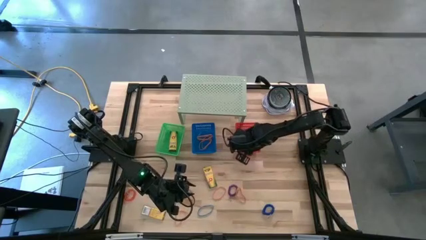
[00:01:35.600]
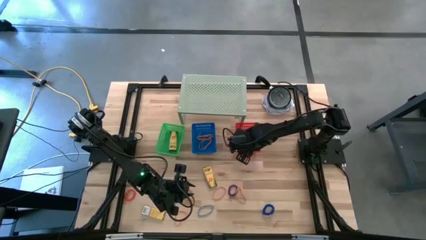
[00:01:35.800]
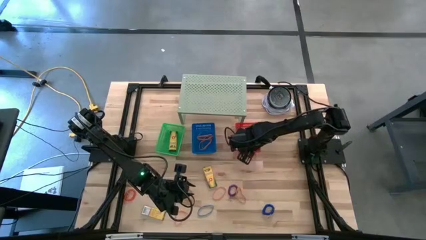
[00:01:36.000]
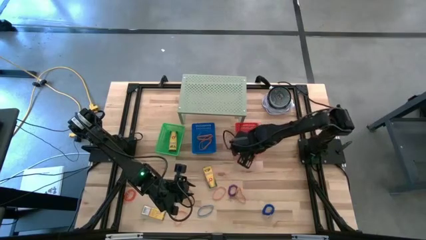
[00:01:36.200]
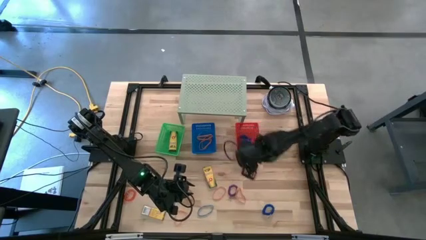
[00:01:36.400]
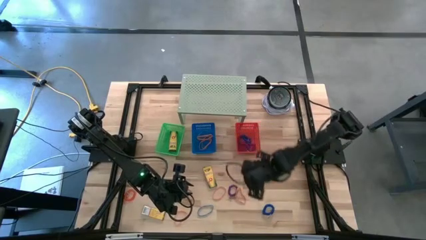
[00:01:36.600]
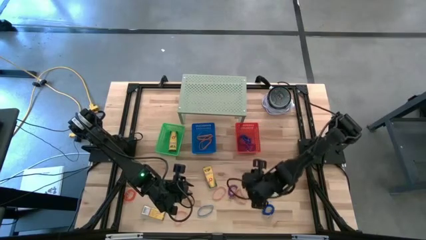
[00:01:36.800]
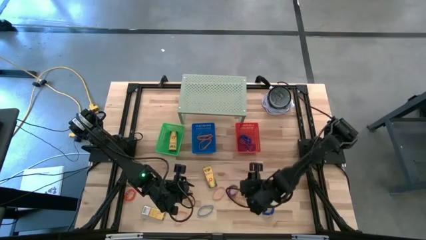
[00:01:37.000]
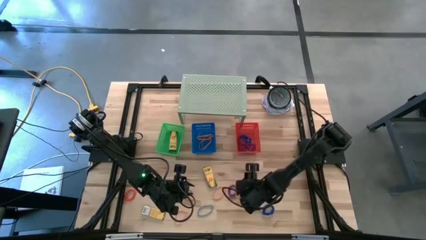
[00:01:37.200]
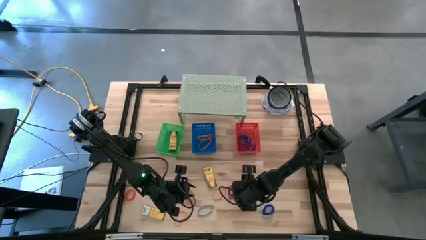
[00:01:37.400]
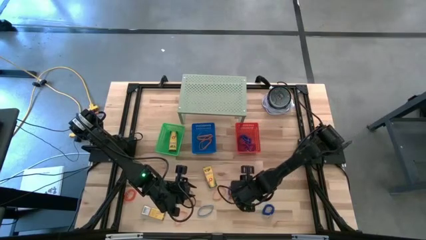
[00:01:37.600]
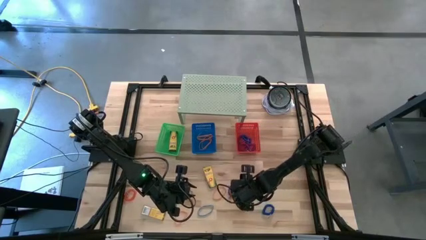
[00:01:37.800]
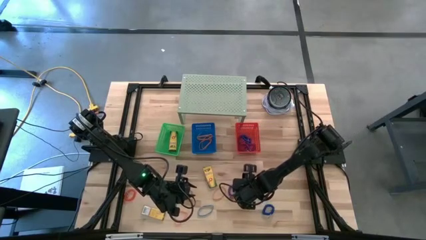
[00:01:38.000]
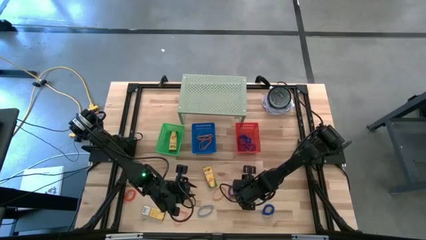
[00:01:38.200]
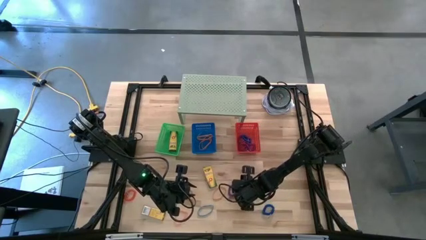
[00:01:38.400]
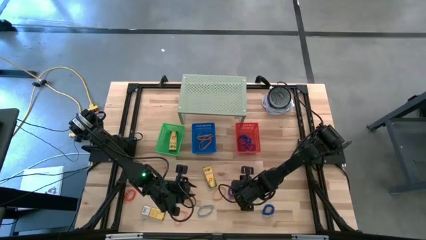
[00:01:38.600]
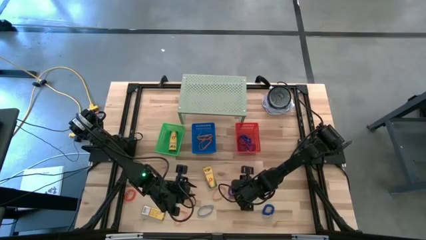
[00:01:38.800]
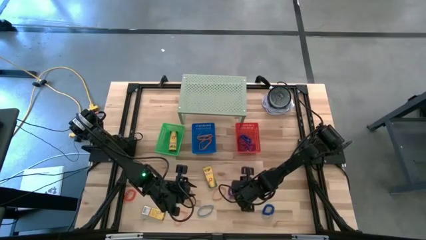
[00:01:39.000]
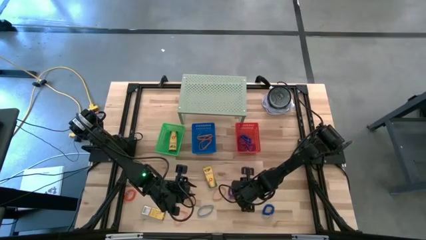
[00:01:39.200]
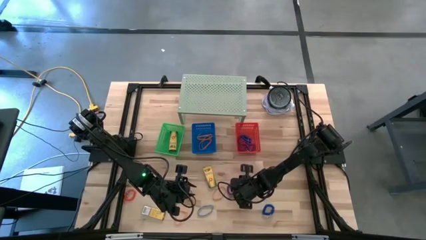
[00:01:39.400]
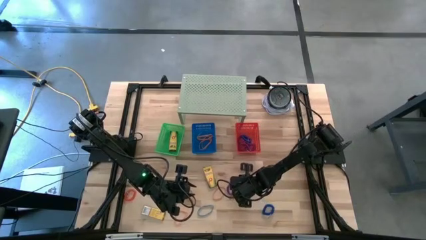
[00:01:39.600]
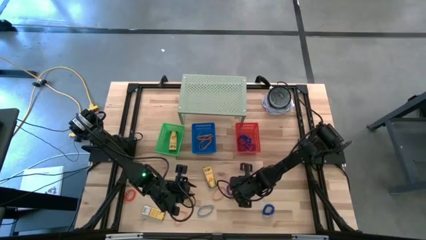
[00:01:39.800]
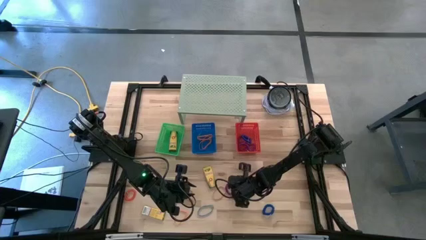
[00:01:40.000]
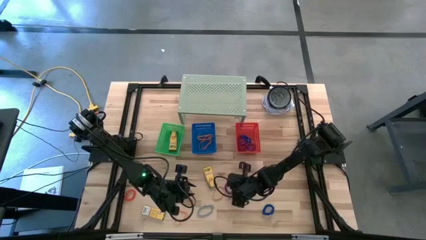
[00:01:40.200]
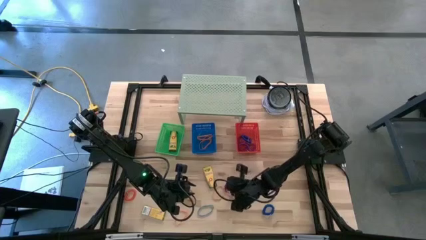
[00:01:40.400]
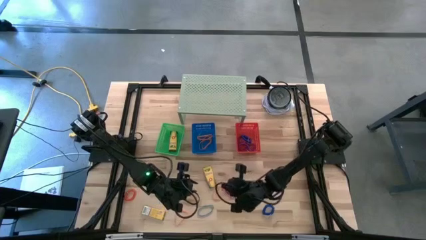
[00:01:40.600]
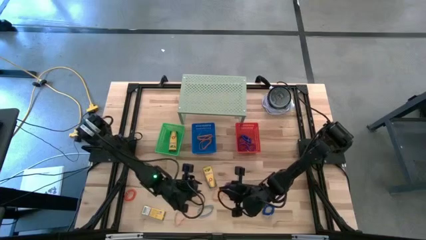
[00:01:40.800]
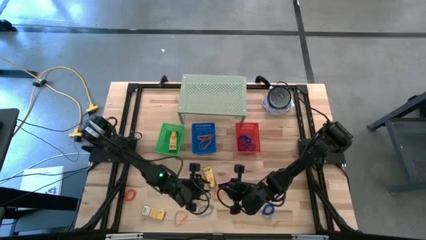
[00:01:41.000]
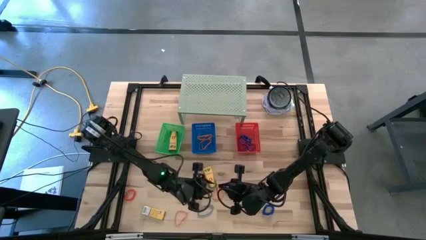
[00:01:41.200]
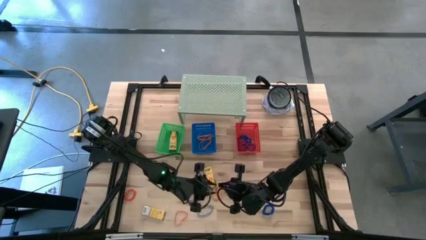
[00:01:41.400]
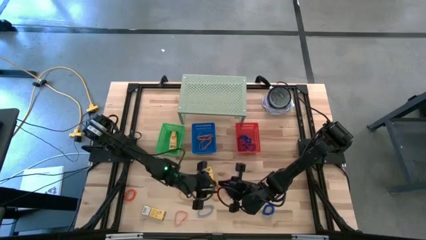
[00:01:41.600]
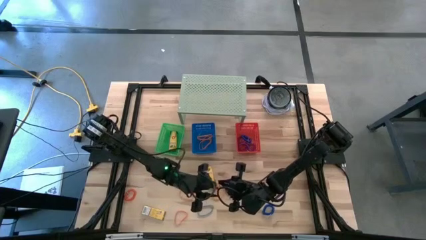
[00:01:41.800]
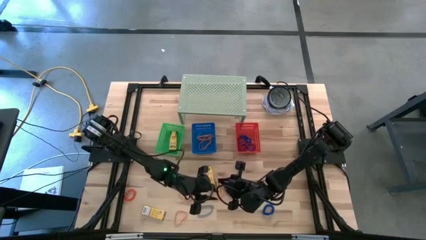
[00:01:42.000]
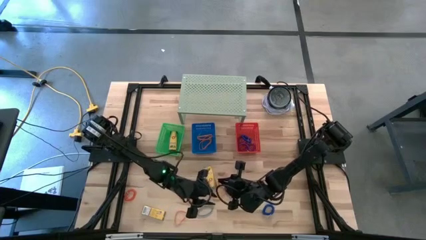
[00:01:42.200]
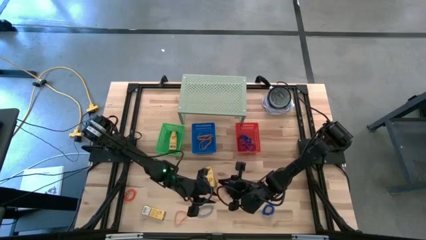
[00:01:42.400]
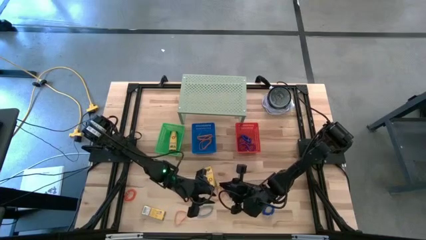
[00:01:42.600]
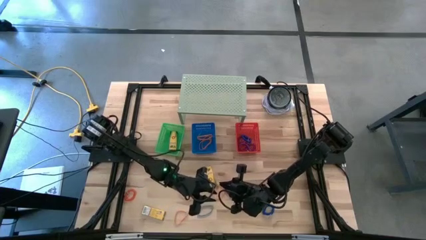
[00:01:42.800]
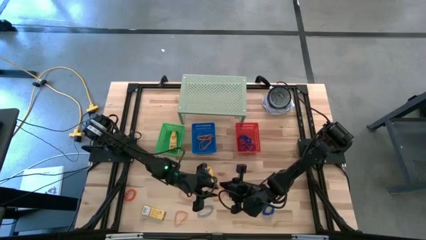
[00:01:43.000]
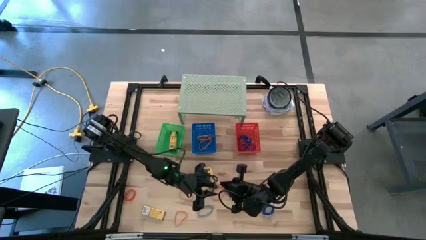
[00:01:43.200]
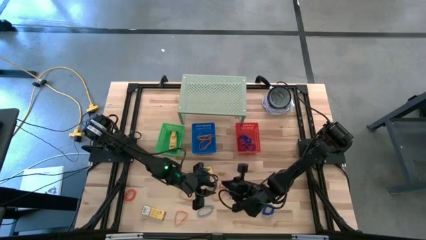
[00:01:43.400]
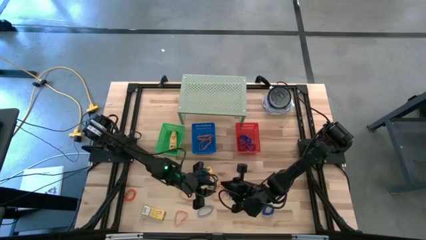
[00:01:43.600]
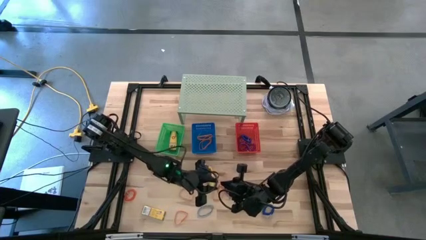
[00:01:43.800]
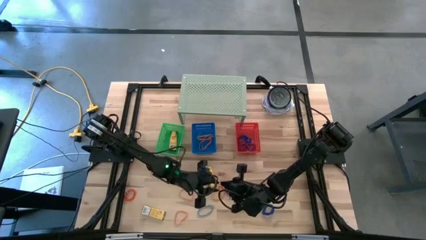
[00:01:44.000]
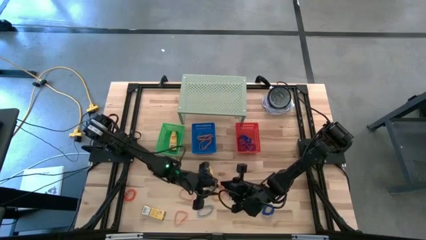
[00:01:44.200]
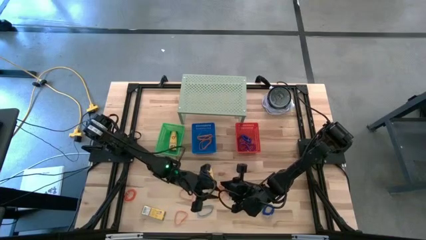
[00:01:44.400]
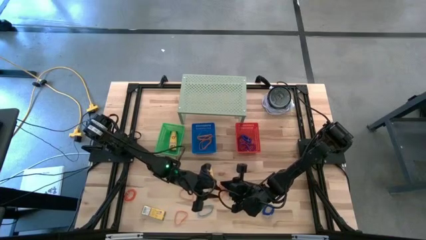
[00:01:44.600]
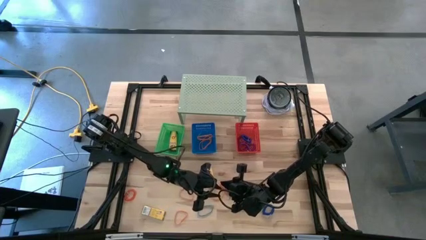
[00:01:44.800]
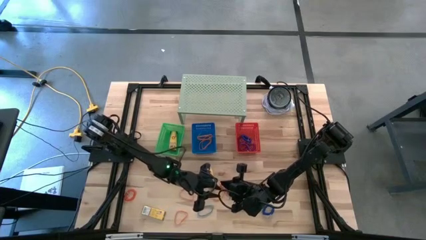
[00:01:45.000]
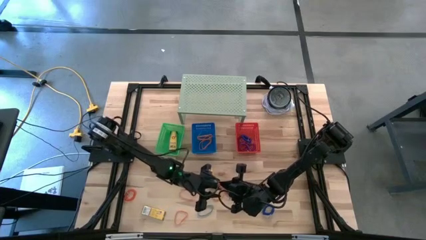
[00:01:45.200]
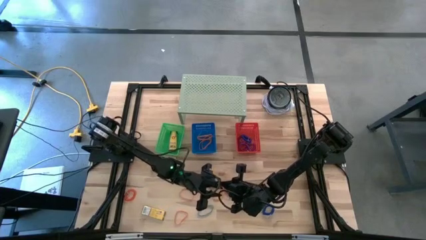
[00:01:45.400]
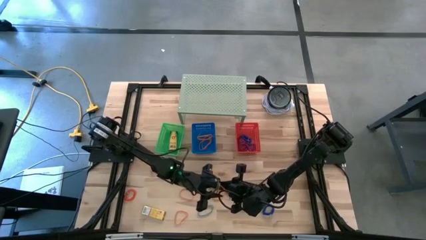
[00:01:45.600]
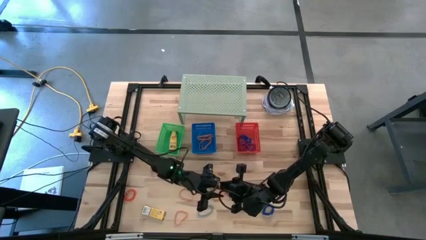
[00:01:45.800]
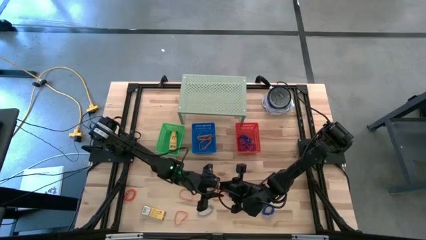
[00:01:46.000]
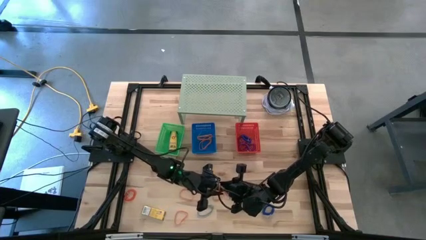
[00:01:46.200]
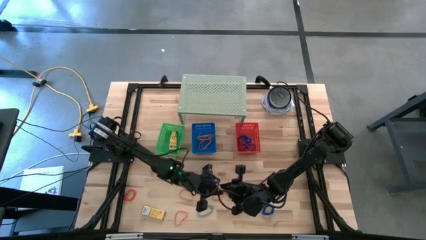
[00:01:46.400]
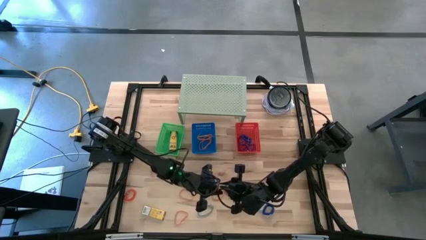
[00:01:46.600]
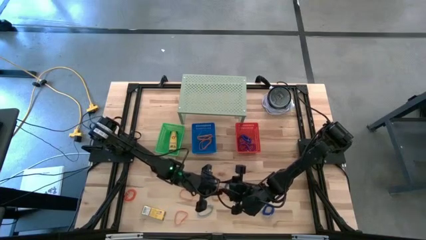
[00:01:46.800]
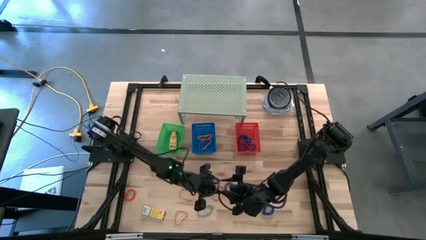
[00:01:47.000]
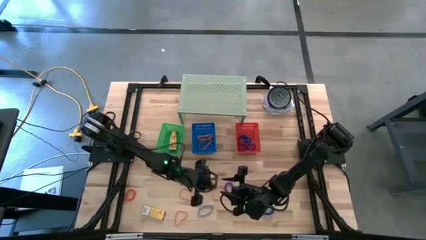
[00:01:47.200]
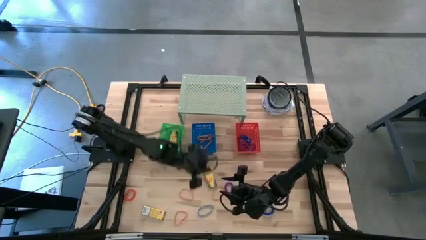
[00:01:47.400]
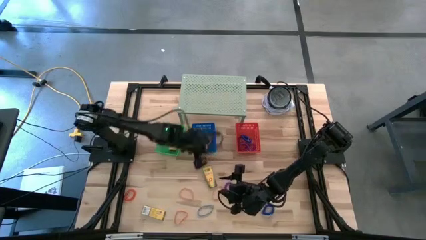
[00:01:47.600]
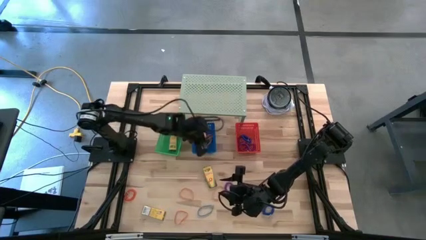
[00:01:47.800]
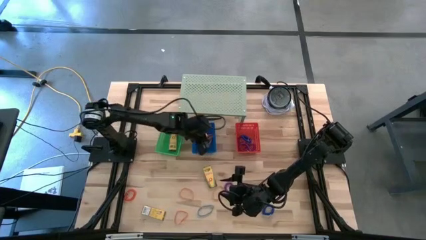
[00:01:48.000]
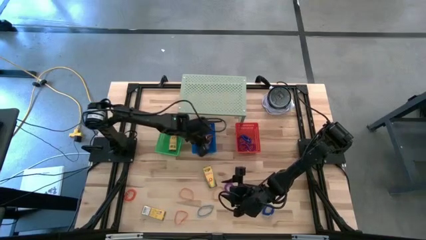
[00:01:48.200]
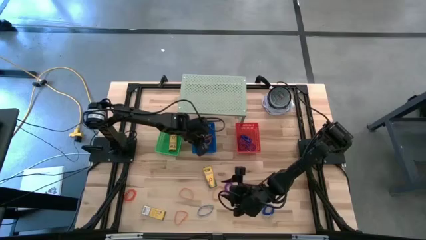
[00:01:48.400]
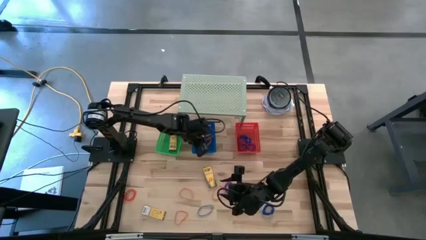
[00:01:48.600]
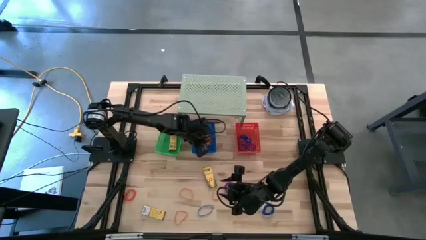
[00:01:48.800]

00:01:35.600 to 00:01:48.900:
Task: Pick & Place Office Desk Supplies
Put the orange rubber band into the blue bin

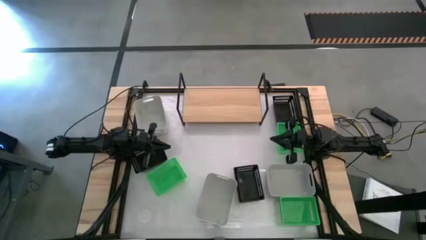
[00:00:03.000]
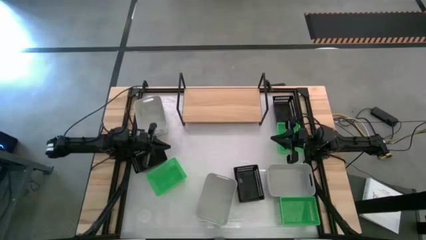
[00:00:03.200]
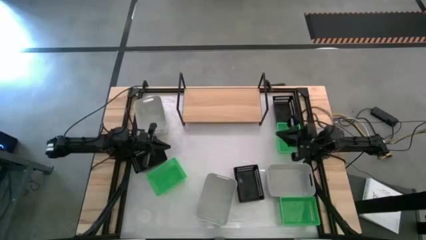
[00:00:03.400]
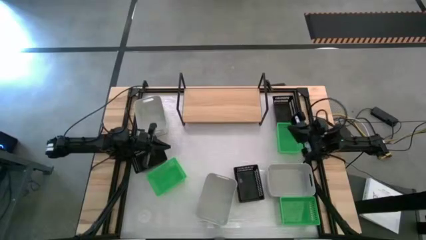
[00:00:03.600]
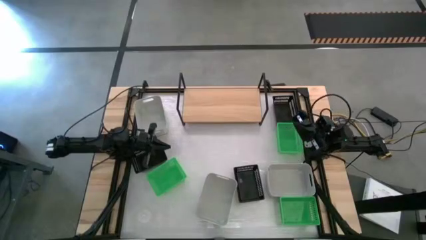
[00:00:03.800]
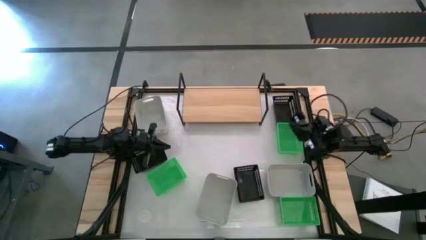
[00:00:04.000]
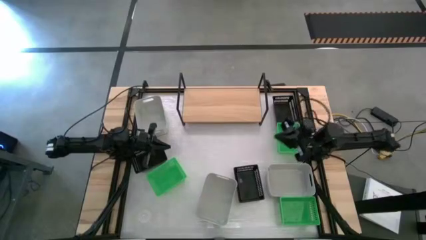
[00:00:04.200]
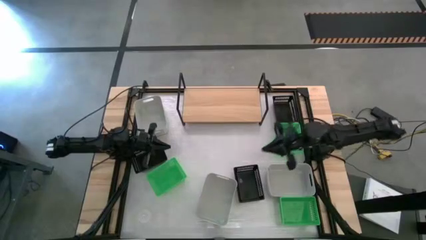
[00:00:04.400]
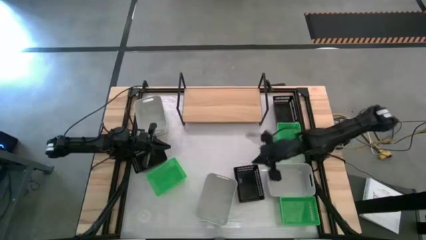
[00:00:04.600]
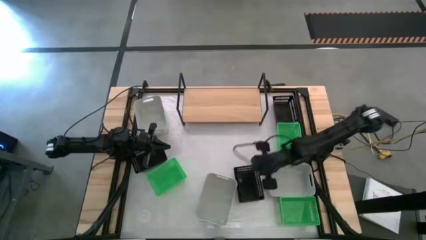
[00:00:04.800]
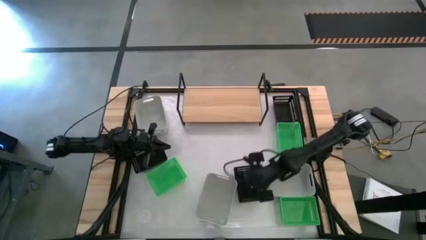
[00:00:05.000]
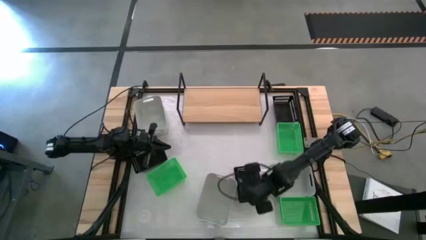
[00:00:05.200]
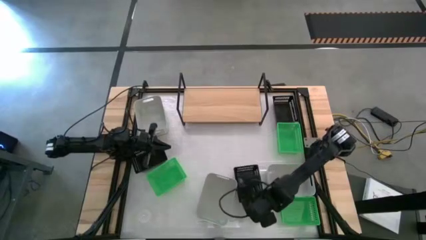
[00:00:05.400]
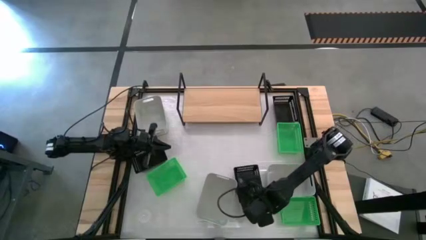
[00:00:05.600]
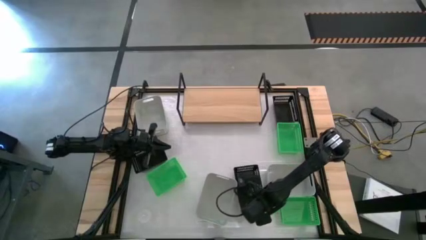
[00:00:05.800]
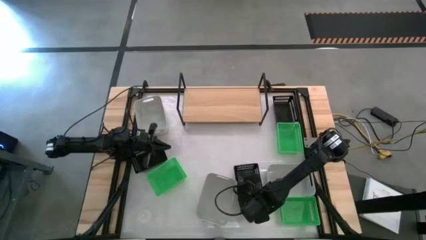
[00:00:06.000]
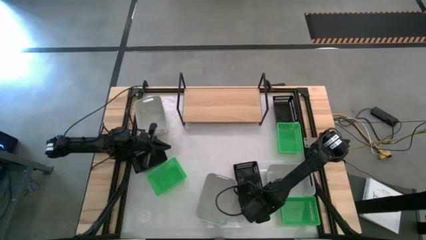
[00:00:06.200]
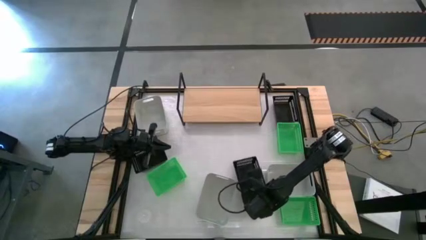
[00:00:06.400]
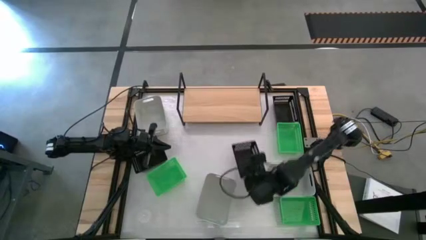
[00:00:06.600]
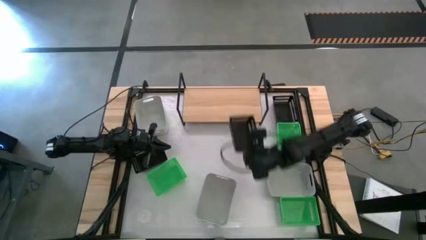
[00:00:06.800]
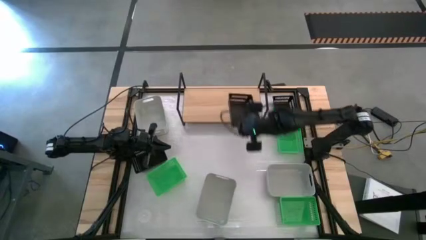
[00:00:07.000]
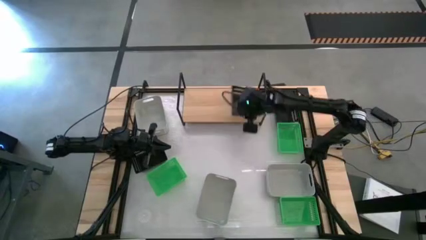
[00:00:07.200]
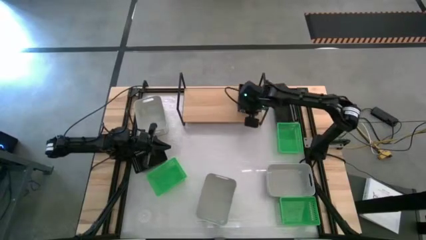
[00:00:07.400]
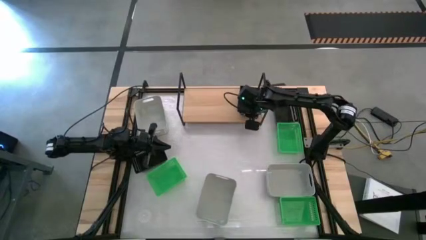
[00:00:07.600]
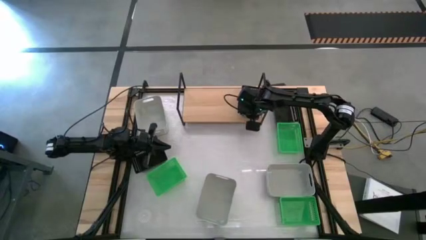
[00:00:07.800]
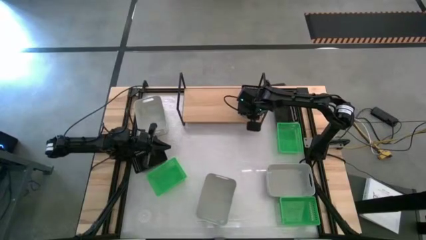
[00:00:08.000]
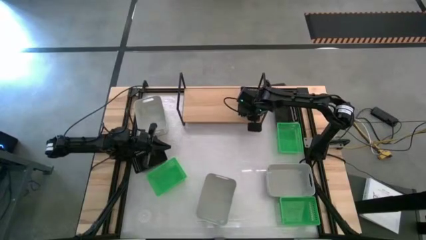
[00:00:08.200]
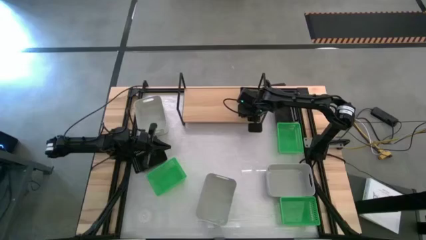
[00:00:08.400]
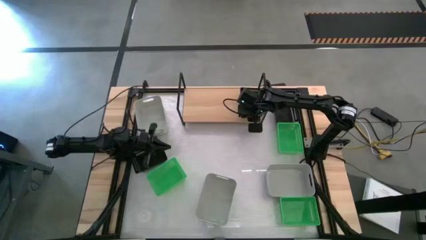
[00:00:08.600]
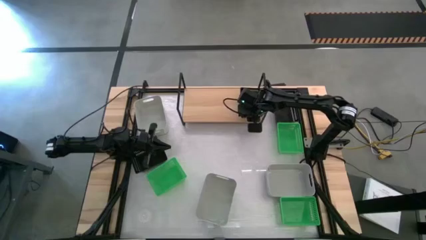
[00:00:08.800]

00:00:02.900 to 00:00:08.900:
Task: Stack baskets on shelf by color
Put the bottom right black bin on the shelf
